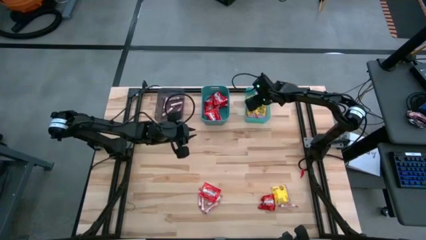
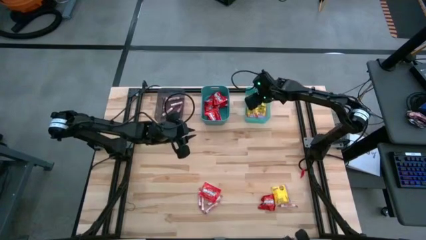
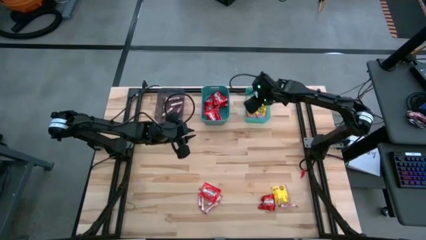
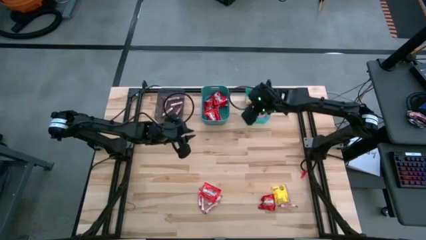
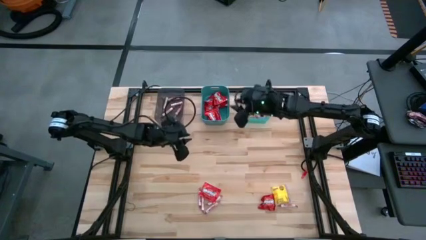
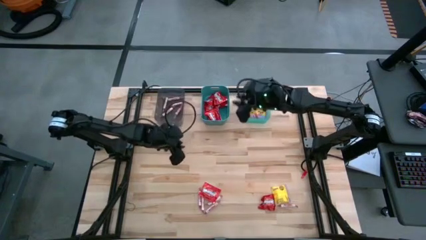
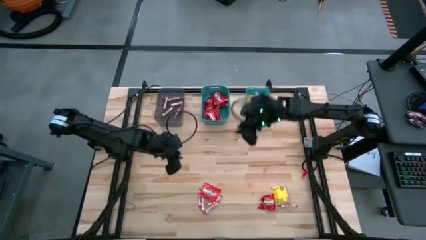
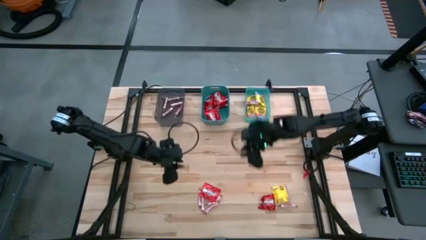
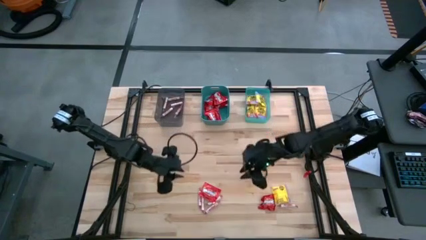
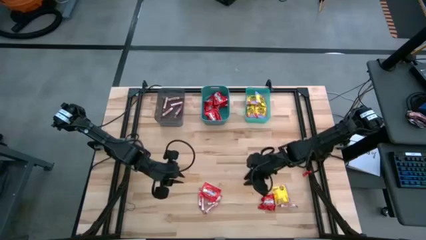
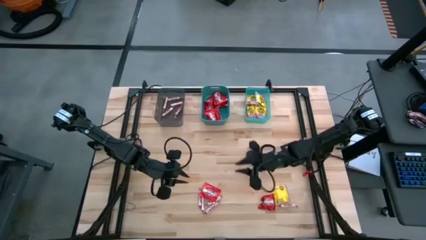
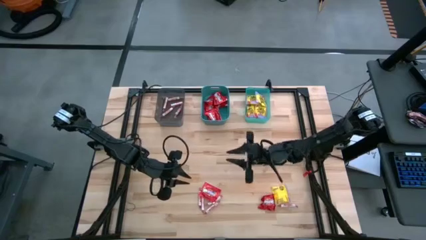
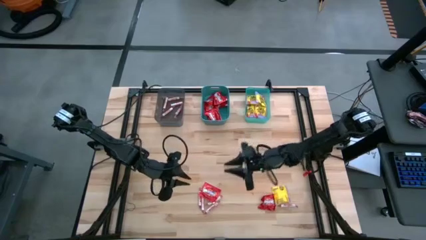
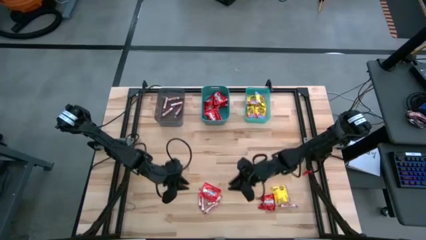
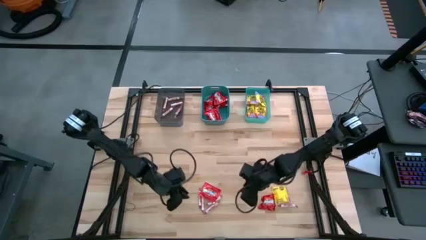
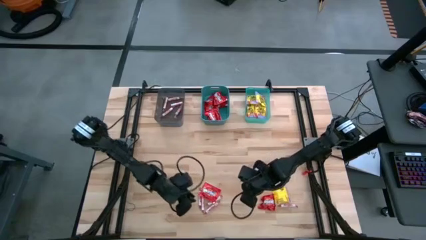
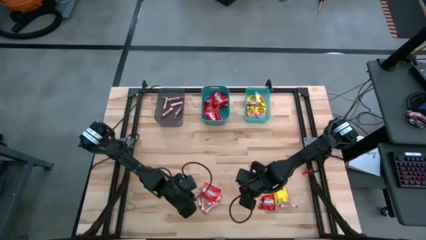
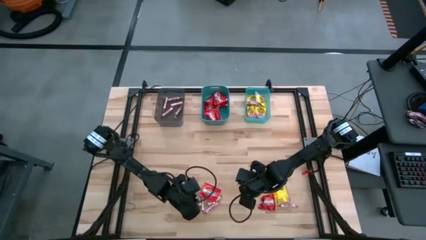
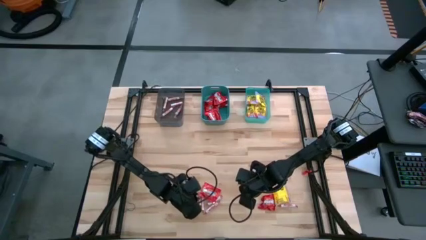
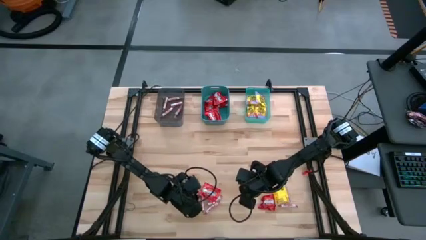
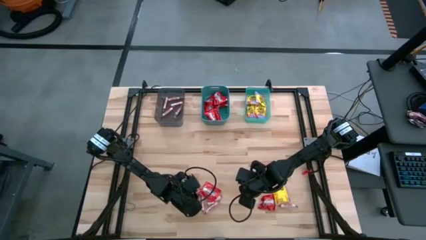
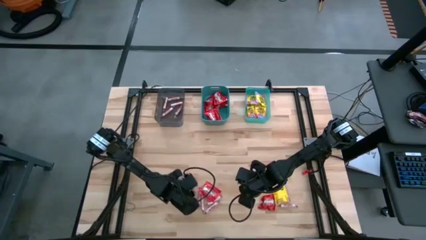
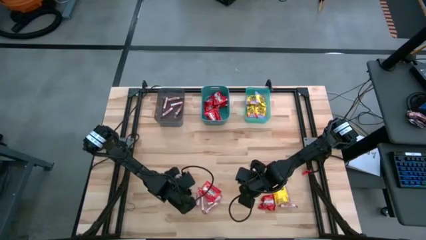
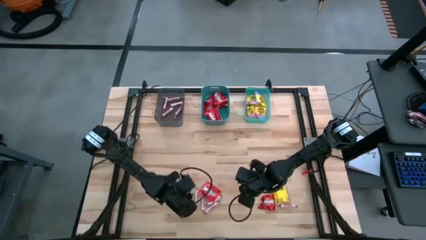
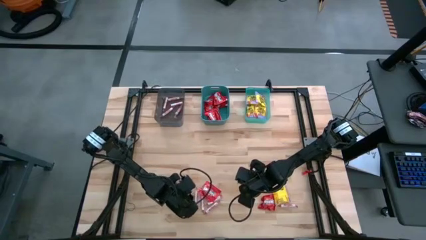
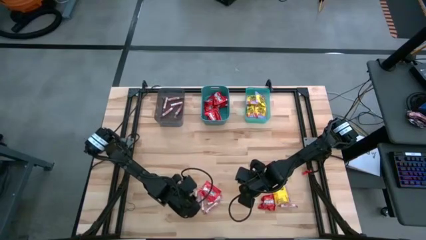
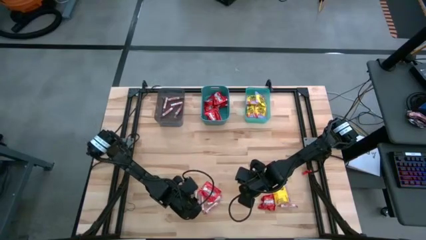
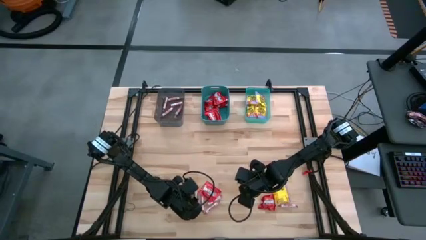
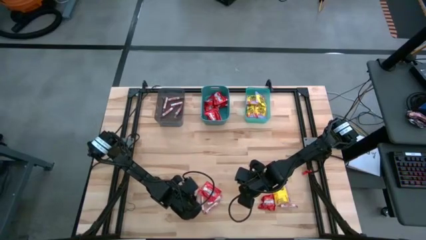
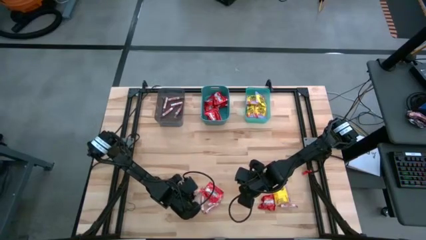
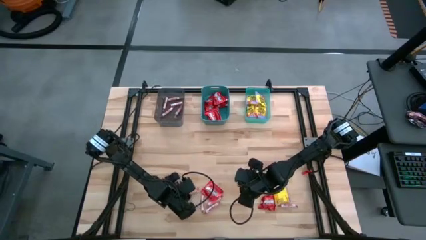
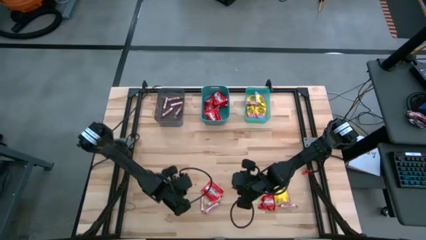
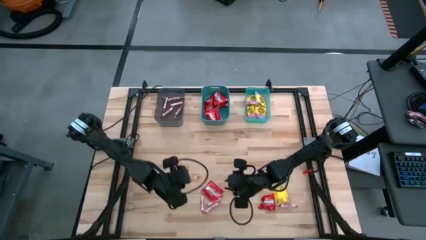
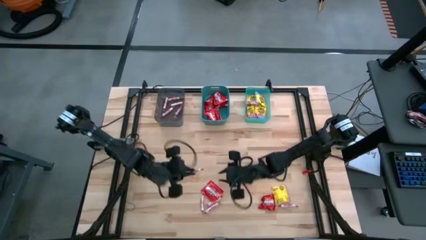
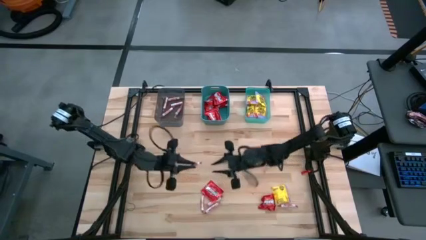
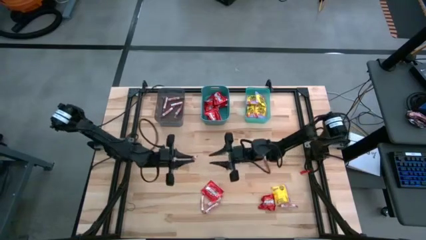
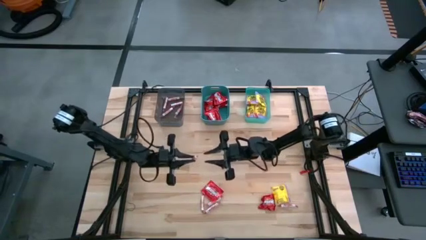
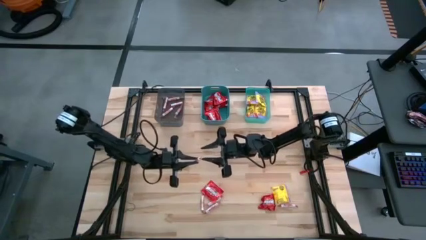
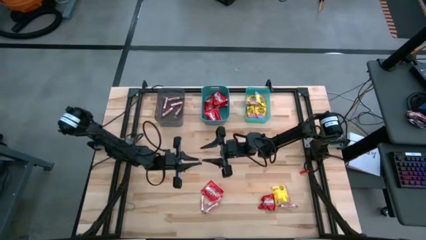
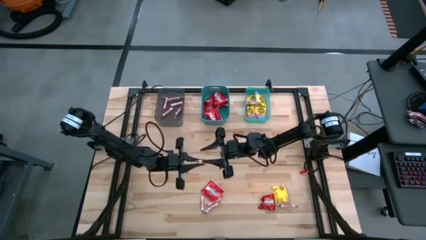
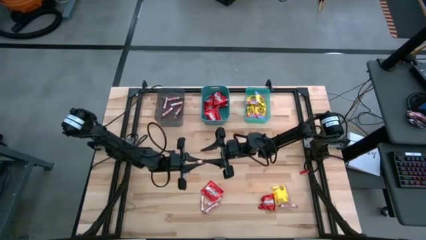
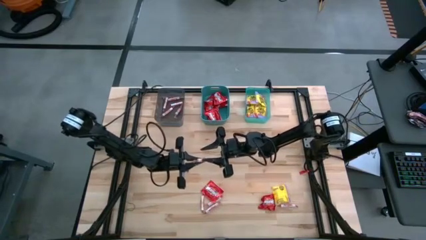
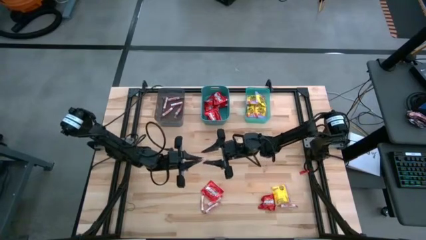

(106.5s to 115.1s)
Task: Sort candy
Put the white candy on the black bin

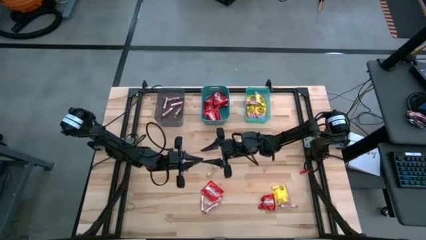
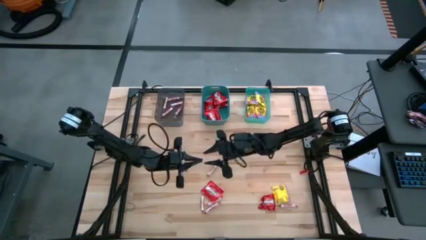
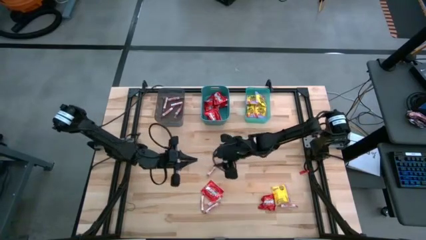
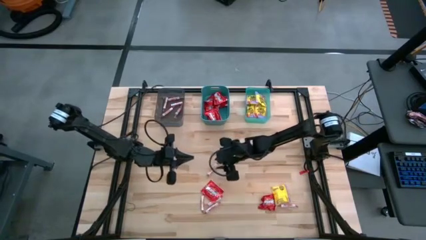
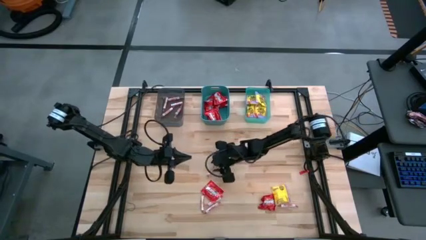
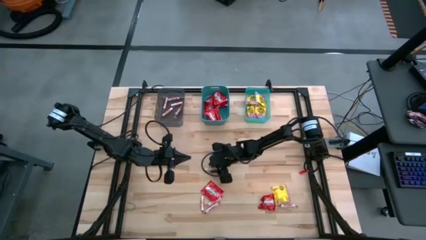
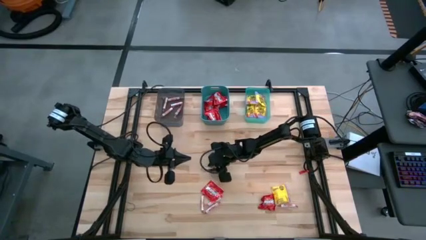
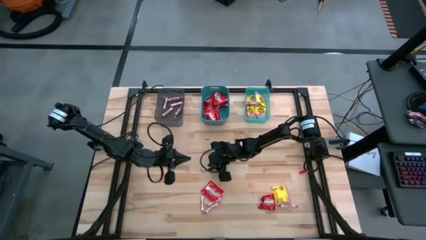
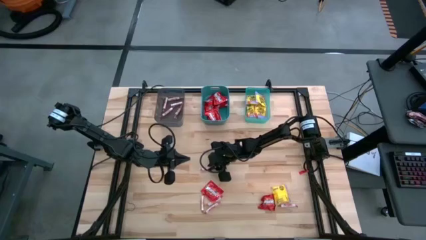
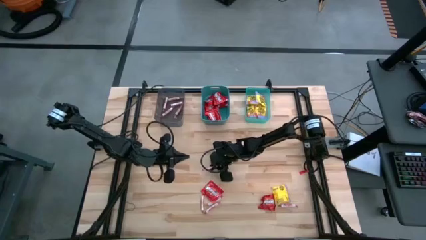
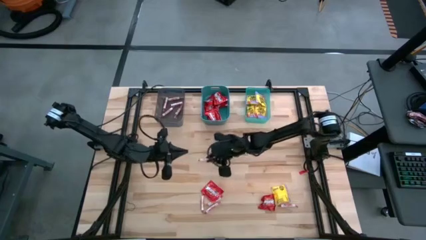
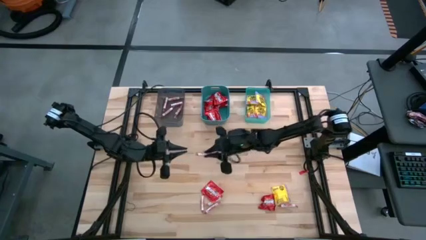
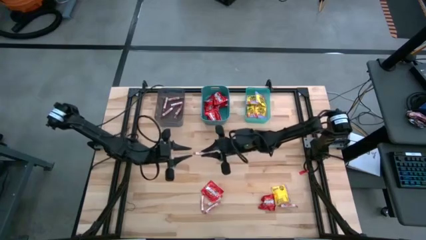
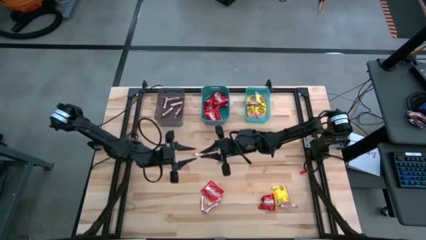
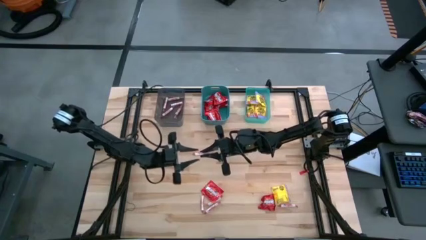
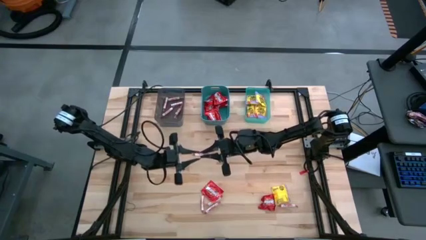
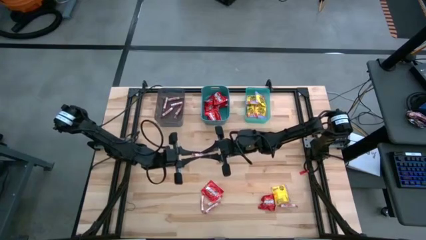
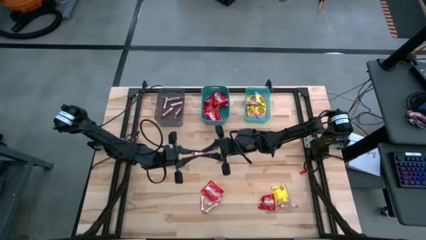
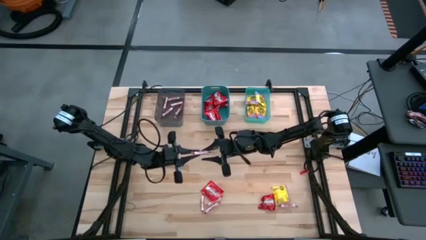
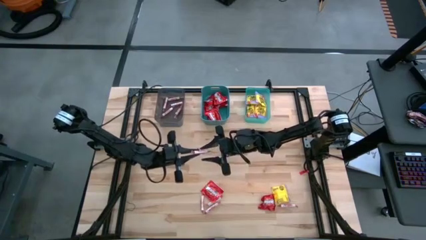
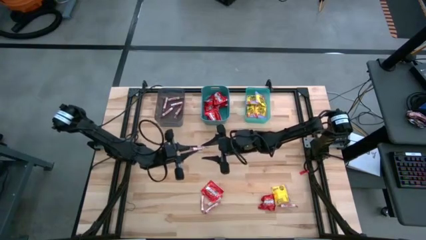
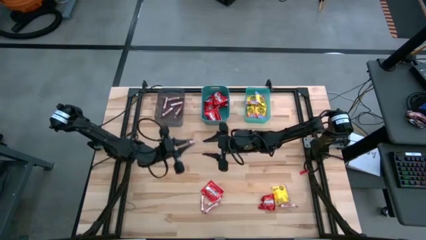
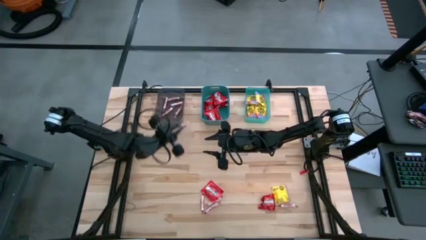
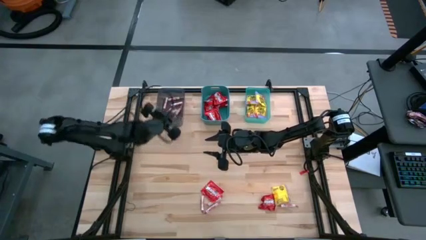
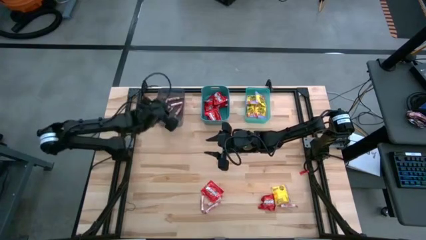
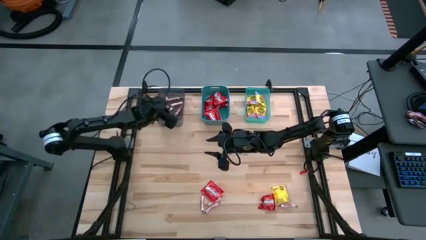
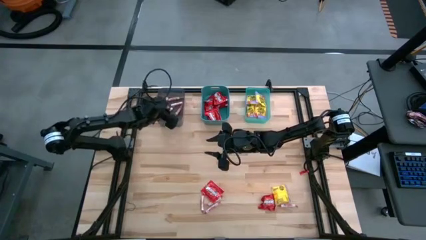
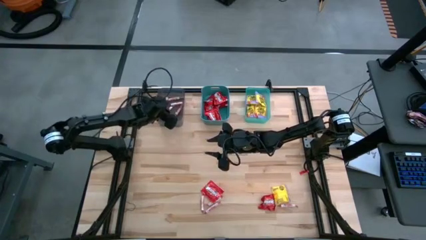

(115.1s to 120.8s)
Put the white candy on the black bin

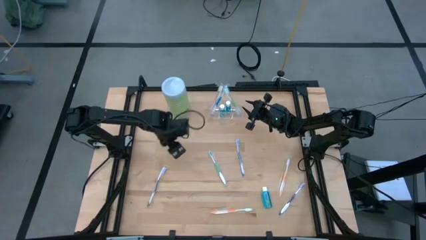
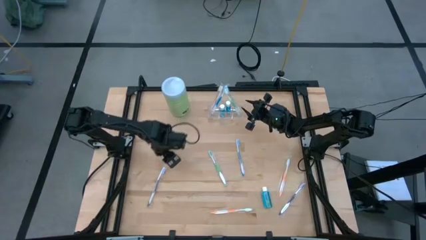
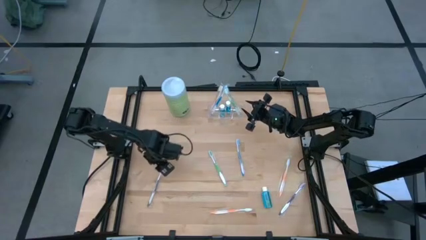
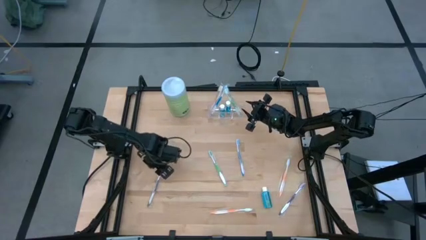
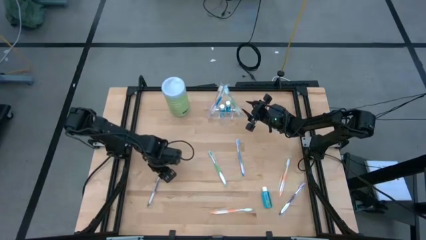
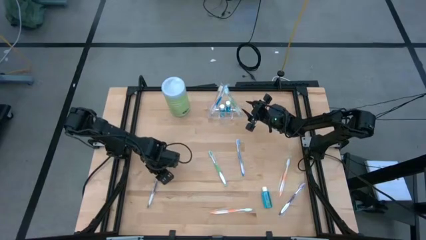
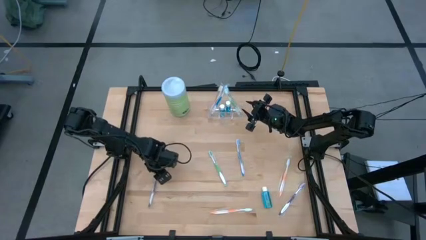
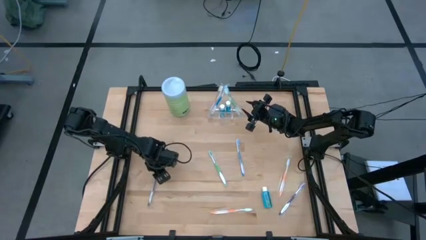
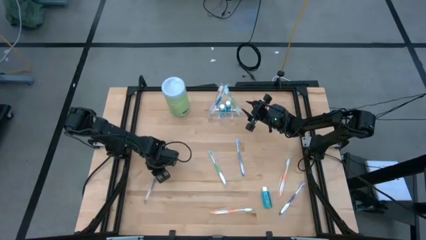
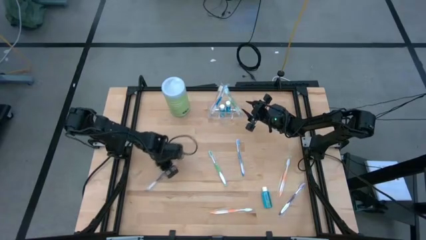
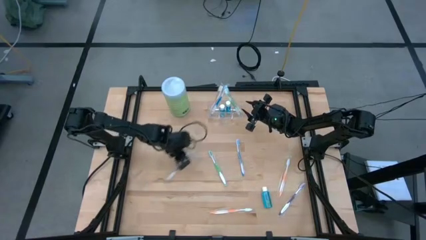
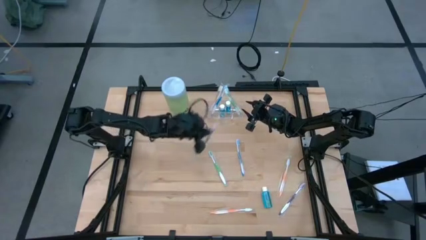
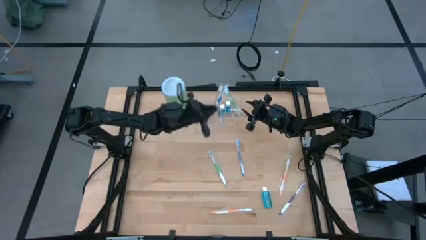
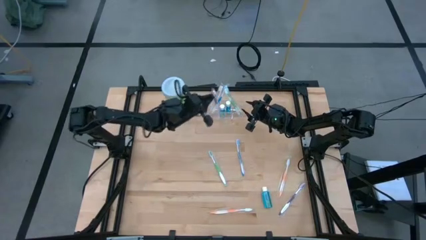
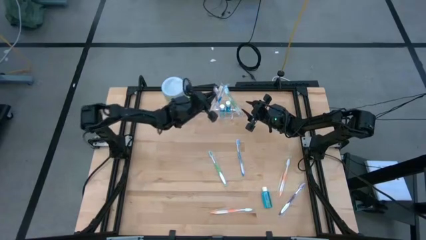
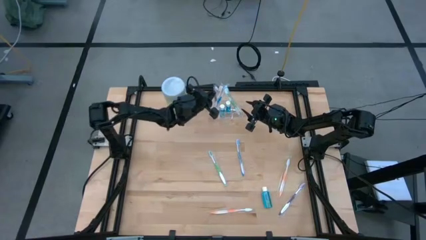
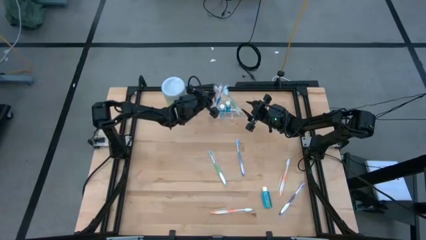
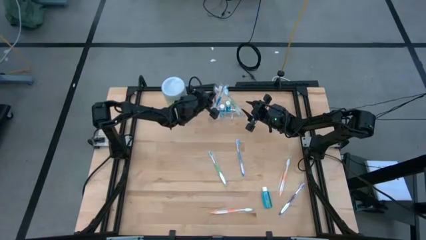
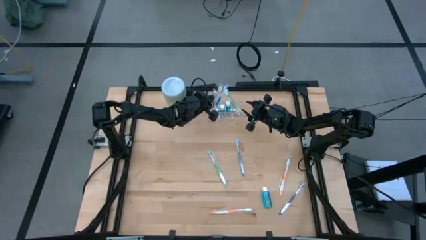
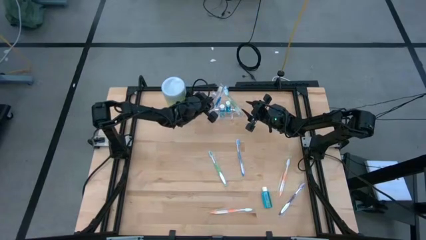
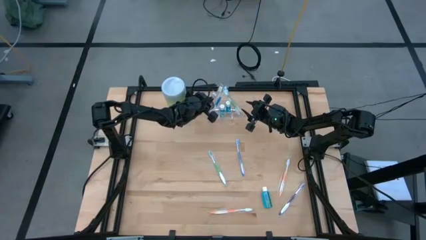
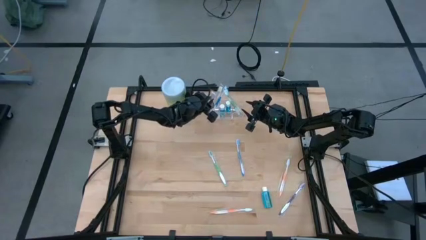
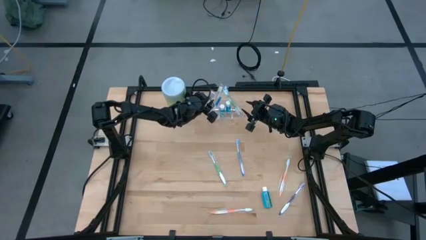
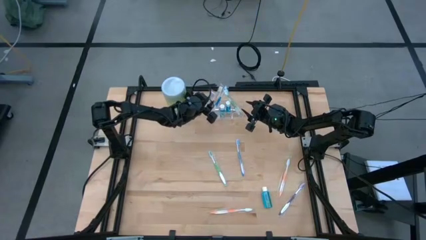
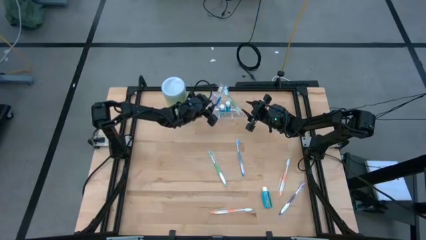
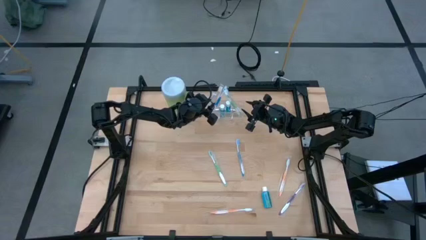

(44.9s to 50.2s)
Task: Pick & Place toothbrushing station
Put the left purple toothbrush into the transparent organizer
